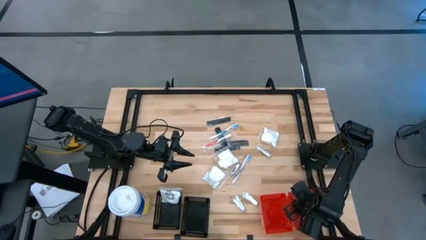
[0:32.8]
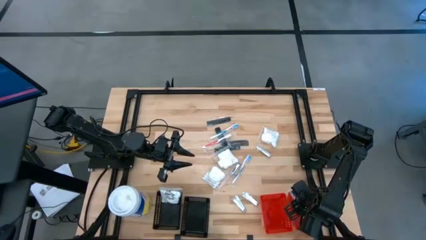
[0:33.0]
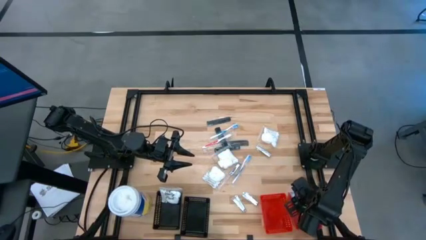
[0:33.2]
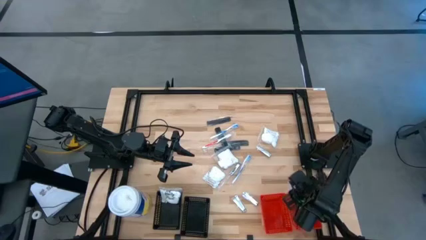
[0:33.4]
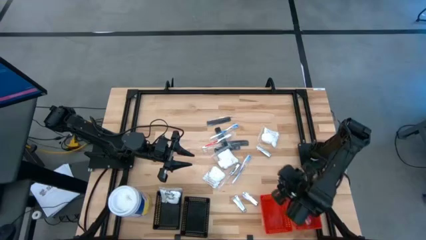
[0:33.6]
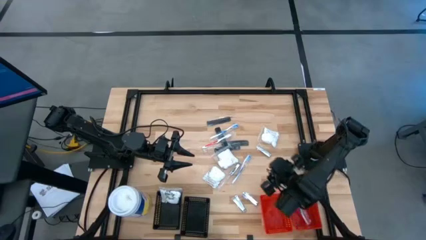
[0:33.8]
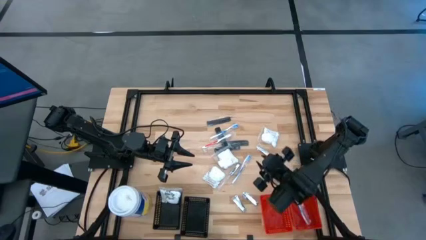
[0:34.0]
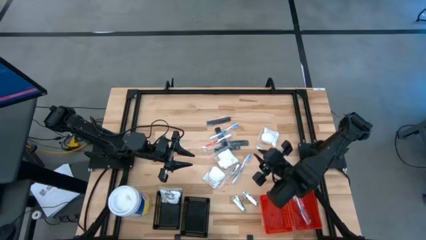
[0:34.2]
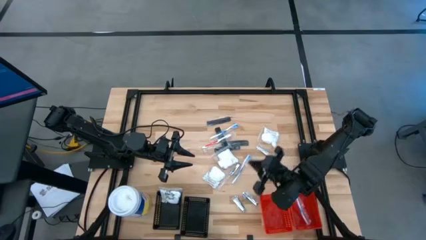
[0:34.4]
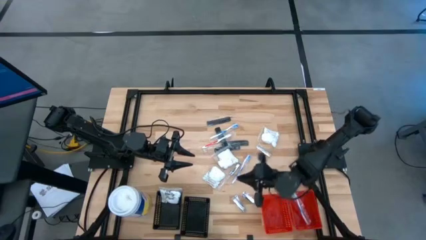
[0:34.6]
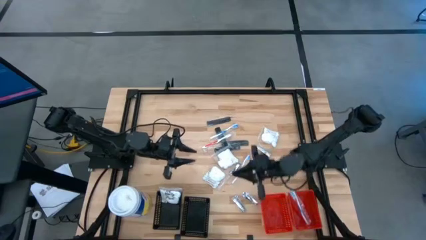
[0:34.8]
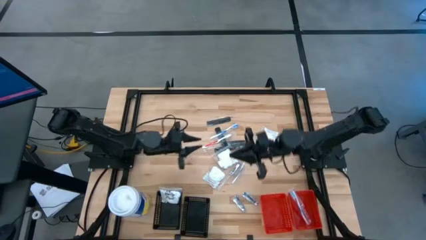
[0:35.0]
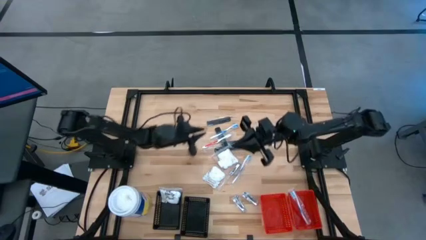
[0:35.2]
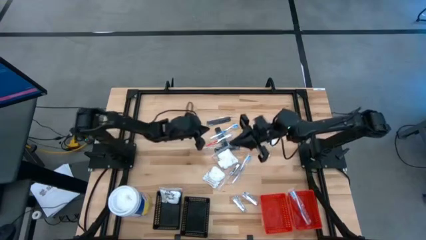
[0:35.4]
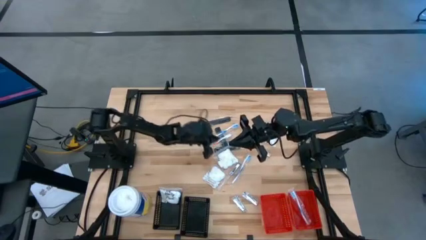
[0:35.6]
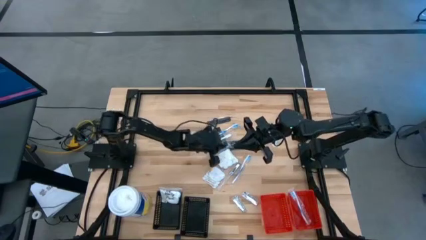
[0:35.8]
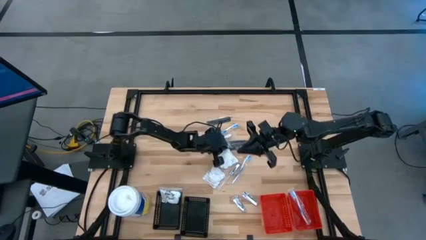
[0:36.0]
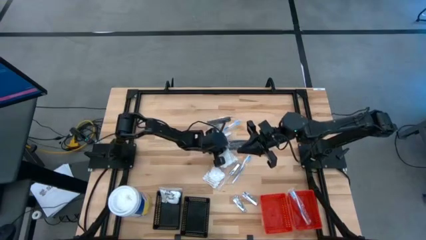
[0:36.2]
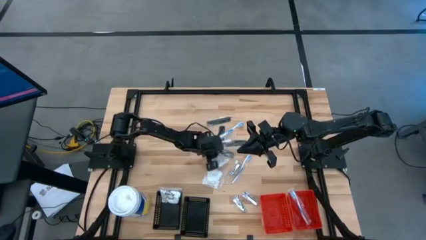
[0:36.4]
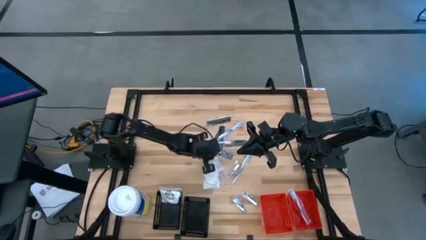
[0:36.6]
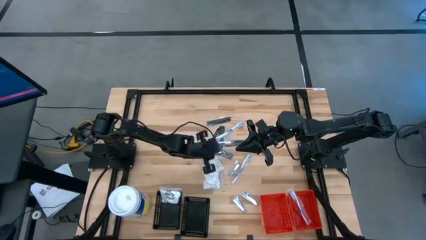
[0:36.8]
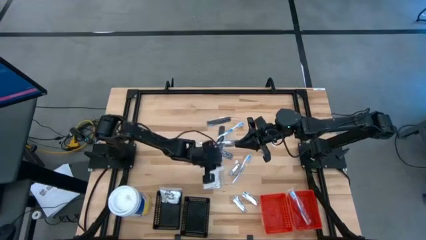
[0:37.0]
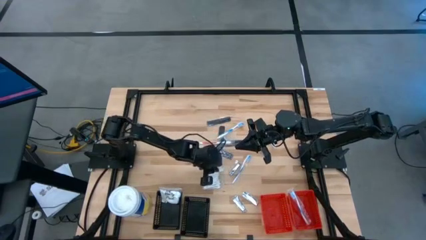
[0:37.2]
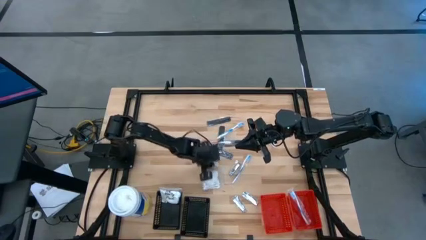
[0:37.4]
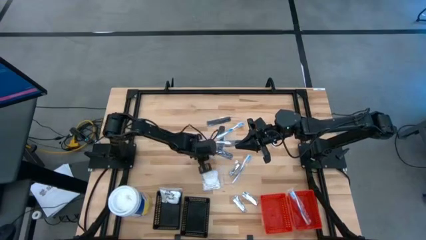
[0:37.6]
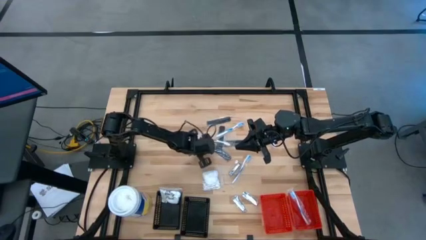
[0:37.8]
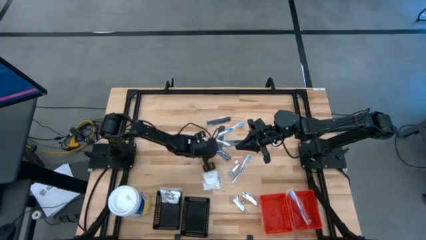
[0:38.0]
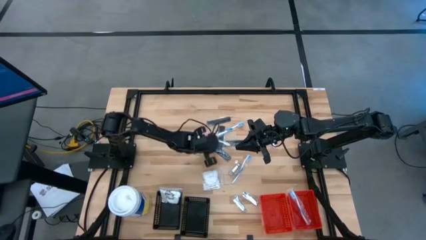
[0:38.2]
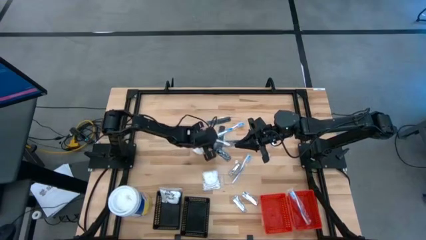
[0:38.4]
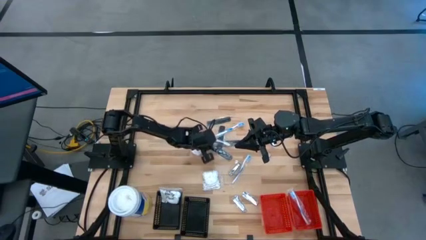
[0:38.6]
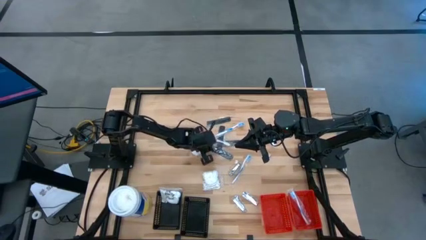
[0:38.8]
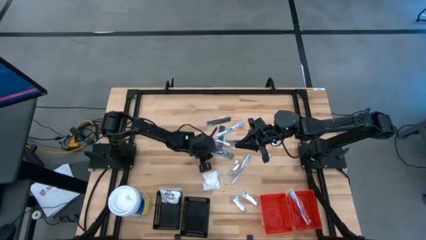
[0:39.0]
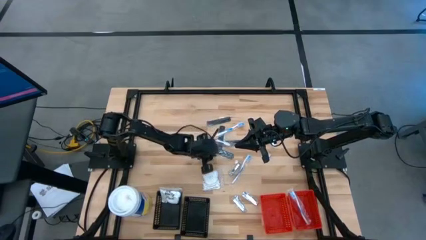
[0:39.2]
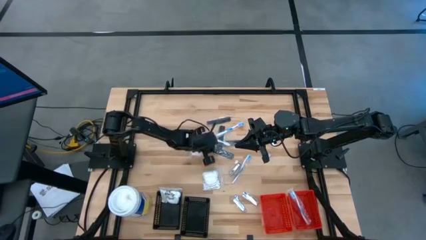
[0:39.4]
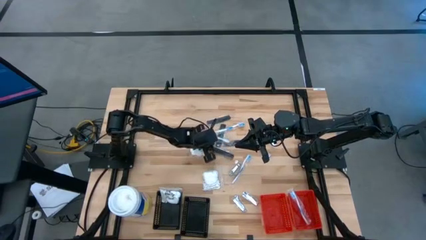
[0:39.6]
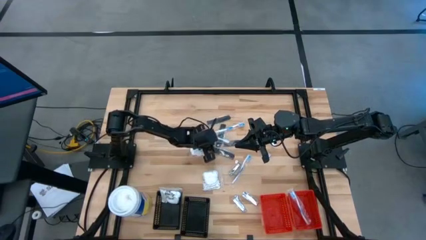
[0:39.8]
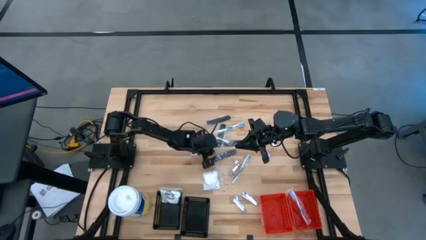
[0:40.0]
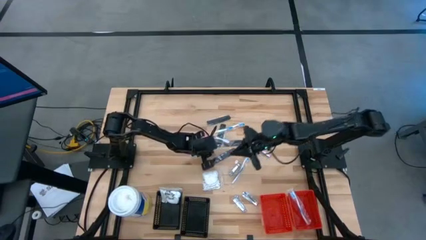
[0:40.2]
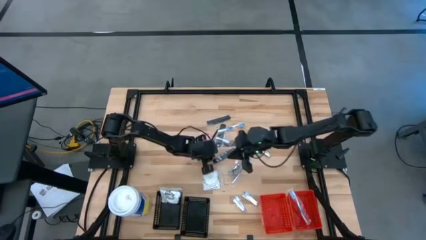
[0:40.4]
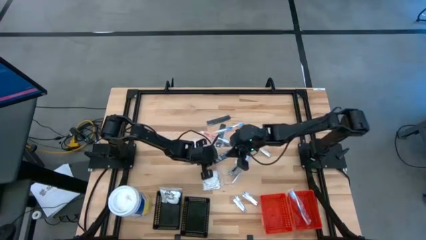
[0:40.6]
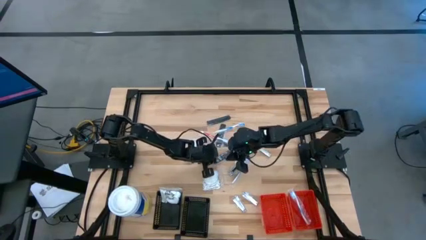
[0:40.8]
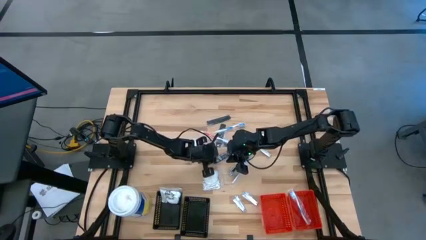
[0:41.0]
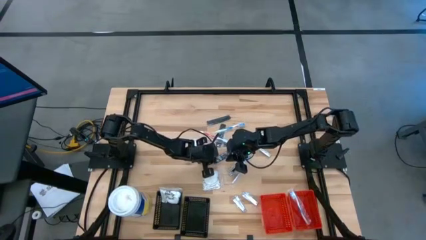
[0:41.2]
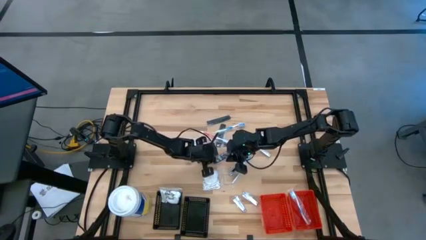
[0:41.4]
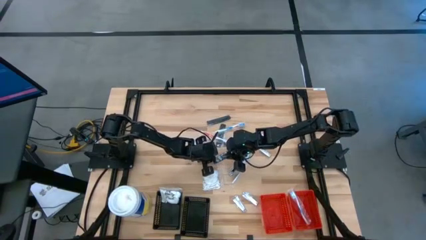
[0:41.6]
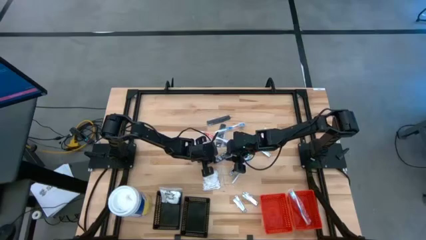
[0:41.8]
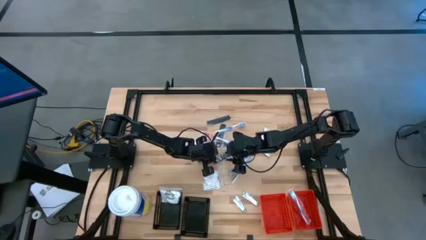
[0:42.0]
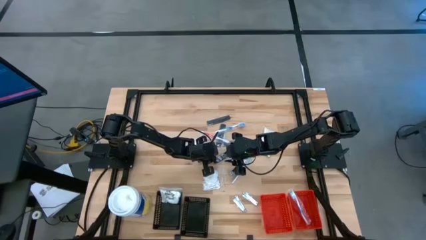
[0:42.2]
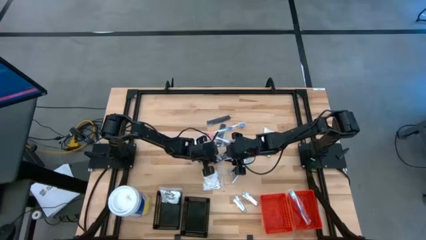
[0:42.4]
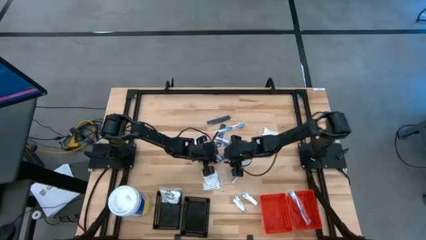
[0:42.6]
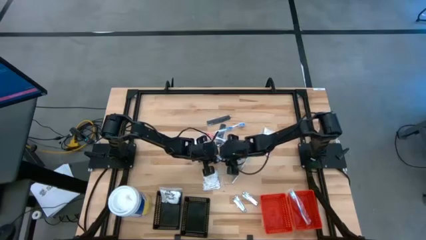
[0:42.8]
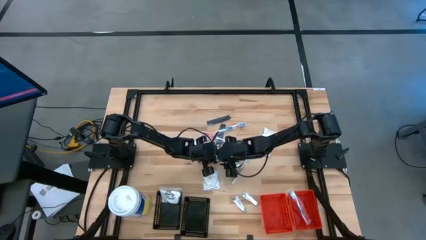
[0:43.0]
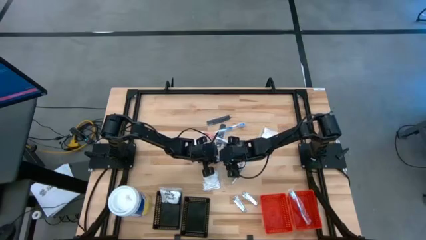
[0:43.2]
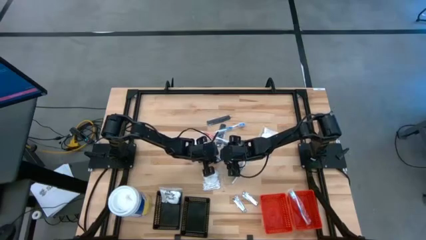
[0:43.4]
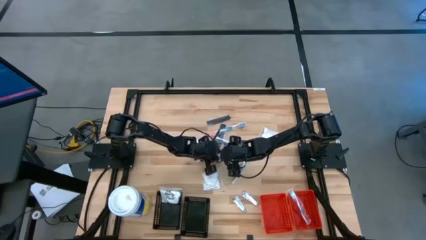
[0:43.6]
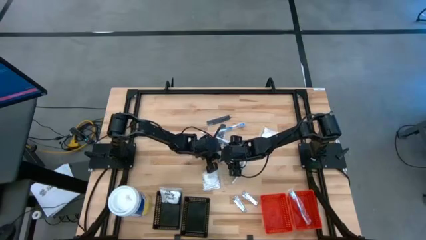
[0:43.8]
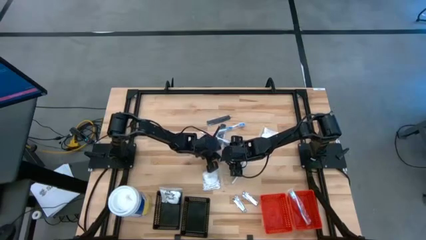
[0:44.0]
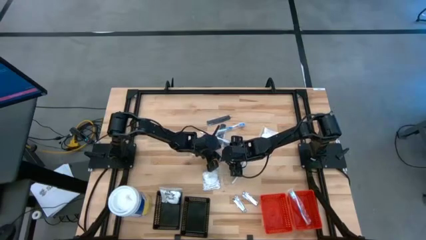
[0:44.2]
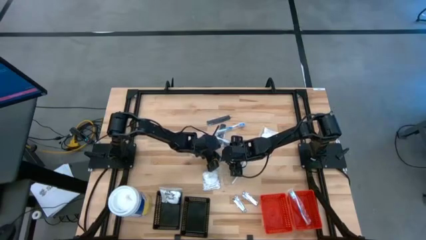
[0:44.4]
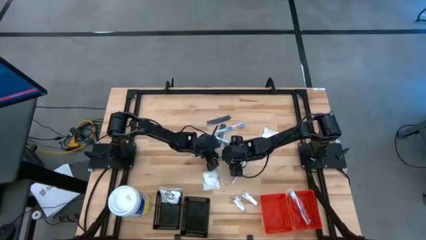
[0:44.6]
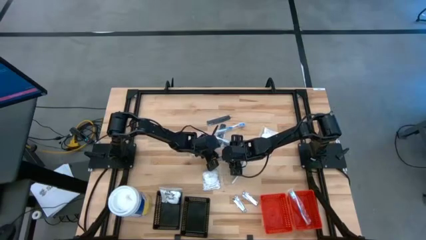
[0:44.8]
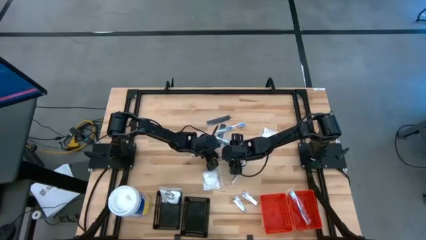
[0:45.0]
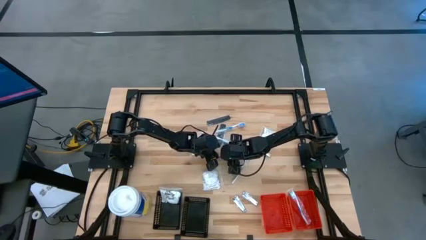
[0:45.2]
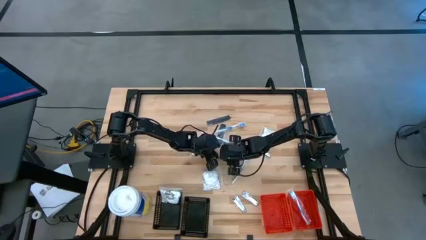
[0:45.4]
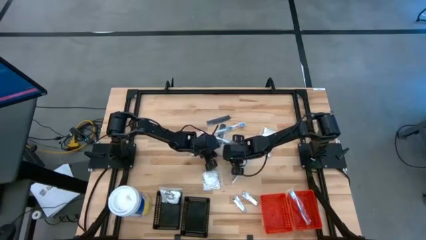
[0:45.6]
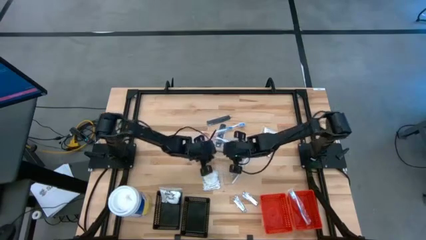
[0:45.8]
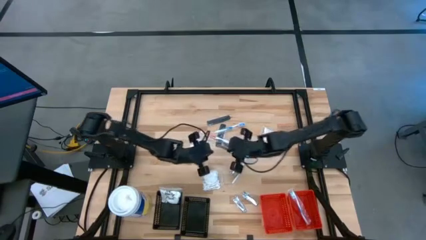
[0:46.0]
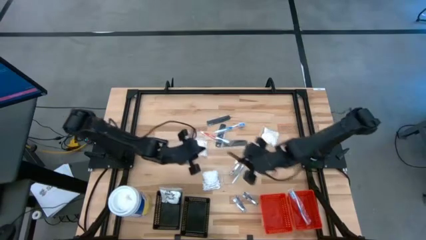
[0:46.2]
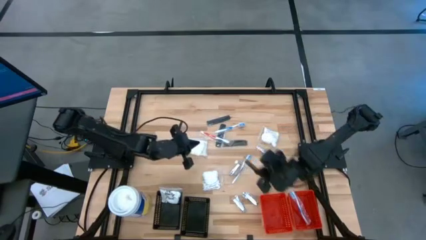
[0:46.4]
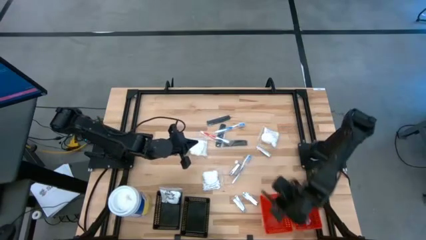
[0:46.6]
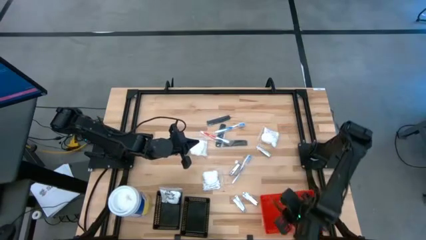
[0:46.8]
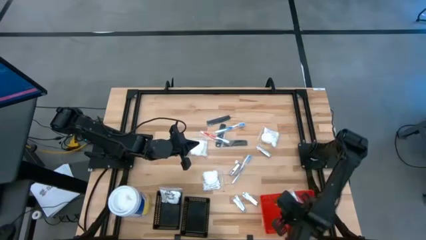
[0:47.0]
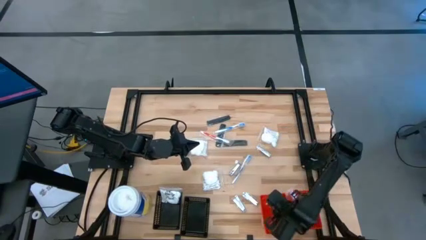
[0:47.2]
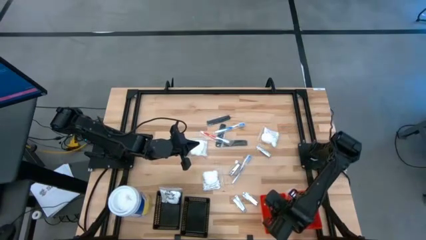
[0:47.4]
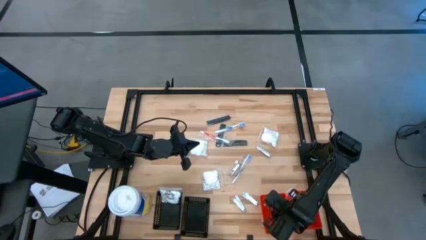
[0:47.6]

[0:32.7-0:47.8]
Task: Pick & Place Travel size toiletries
Put the black hair comb into the left red bin
